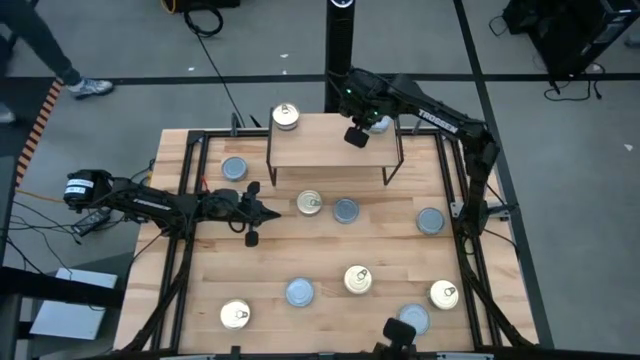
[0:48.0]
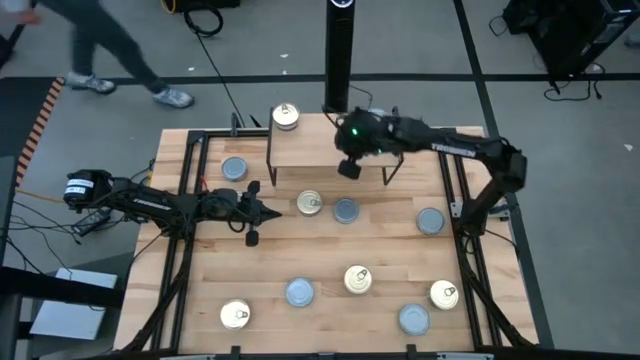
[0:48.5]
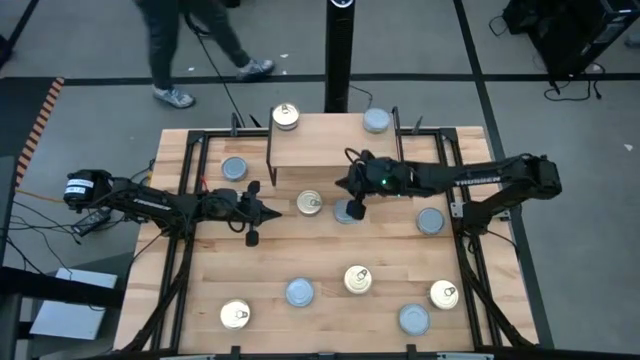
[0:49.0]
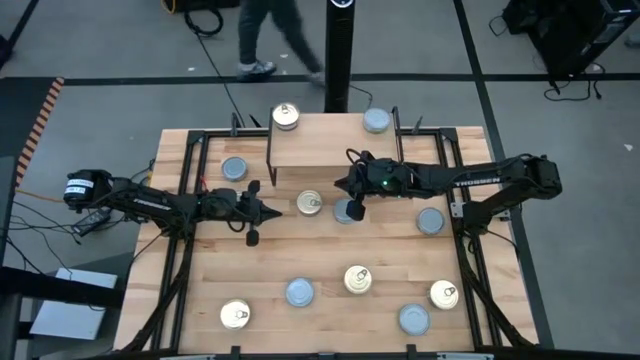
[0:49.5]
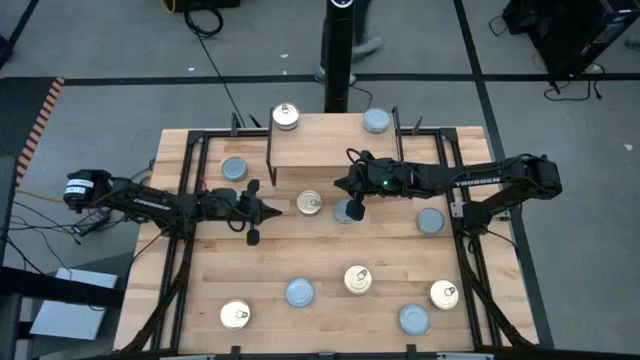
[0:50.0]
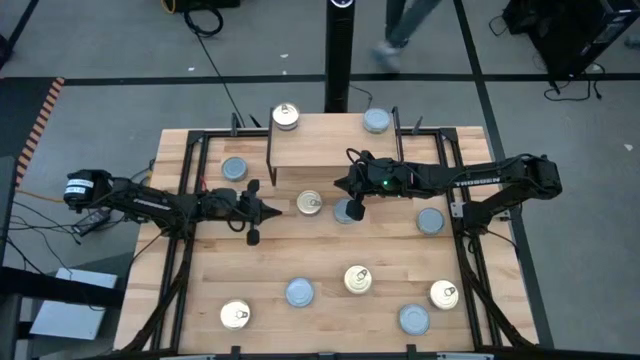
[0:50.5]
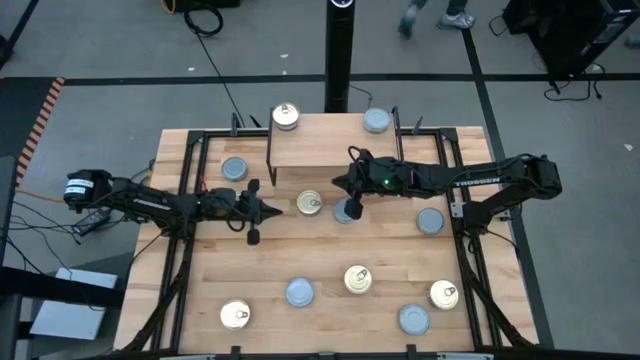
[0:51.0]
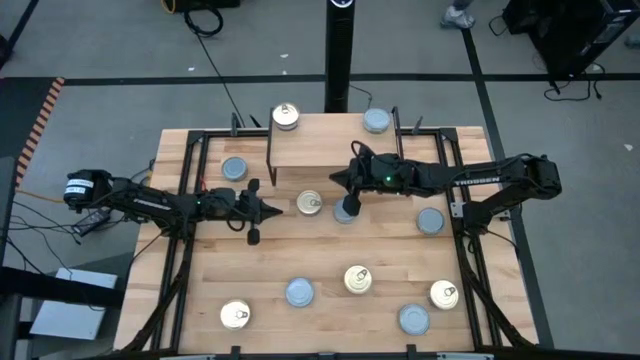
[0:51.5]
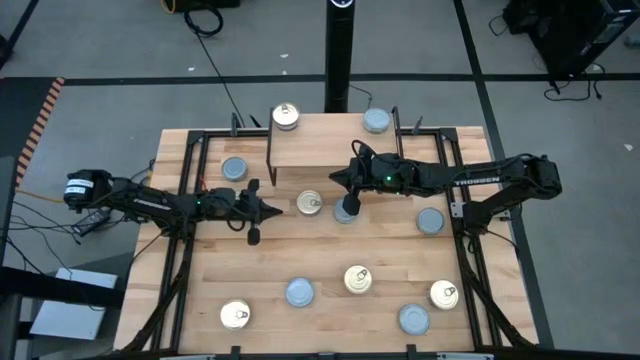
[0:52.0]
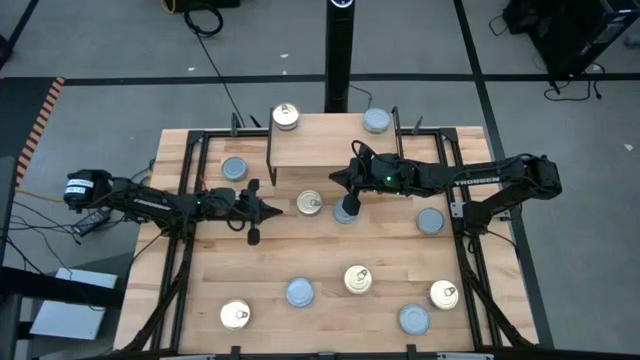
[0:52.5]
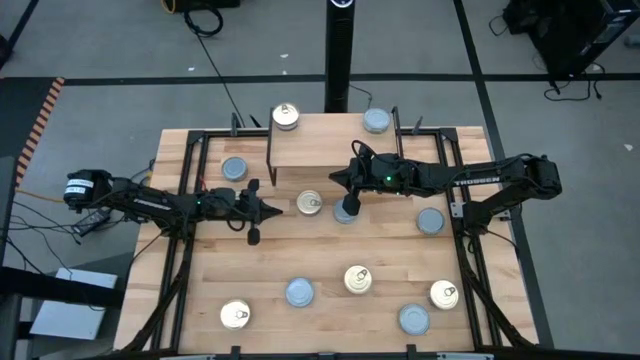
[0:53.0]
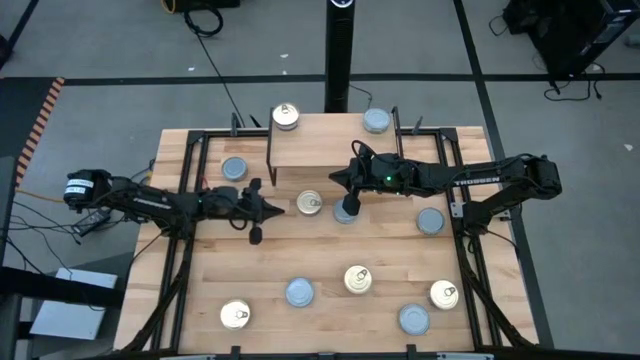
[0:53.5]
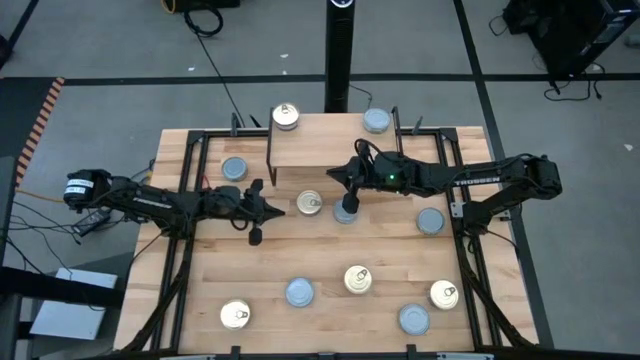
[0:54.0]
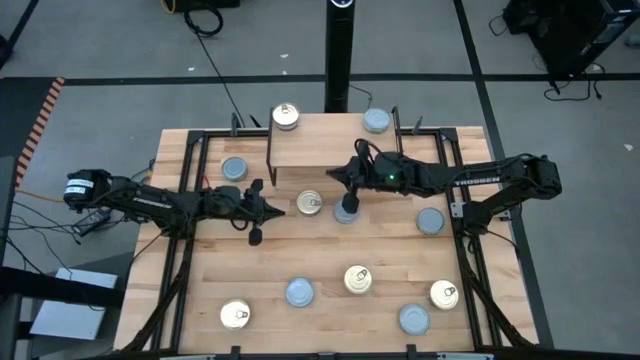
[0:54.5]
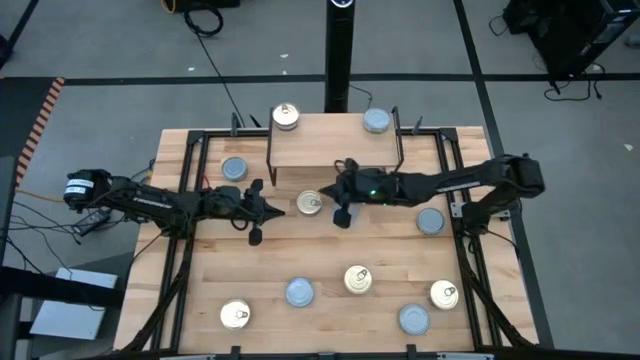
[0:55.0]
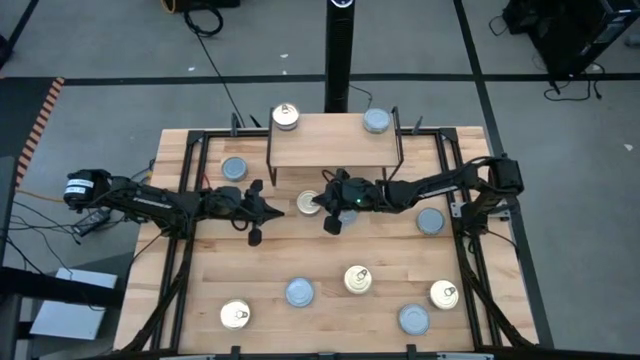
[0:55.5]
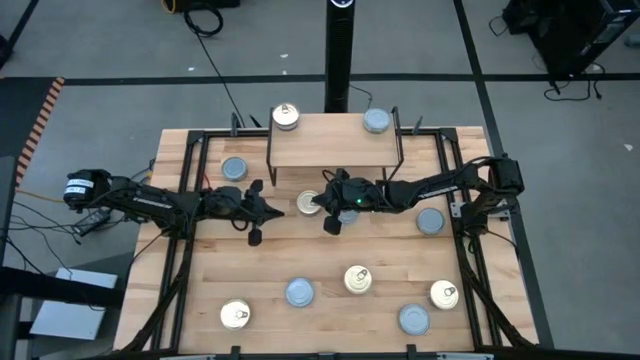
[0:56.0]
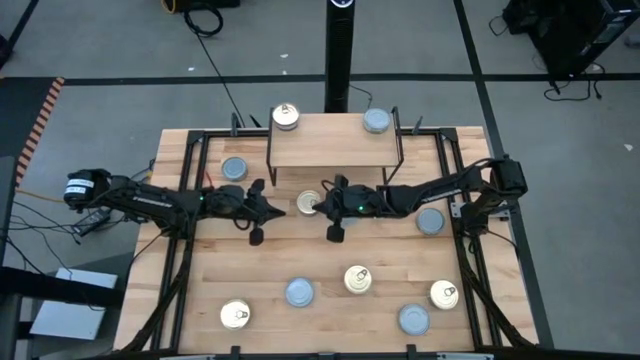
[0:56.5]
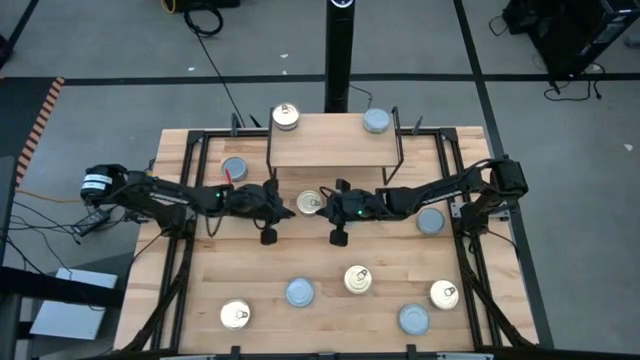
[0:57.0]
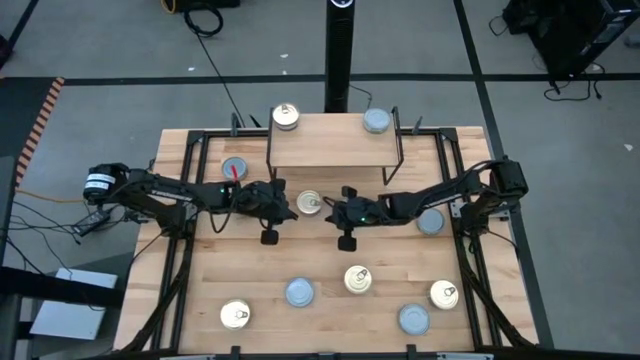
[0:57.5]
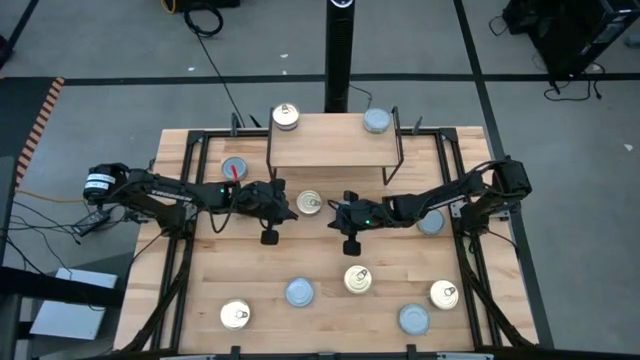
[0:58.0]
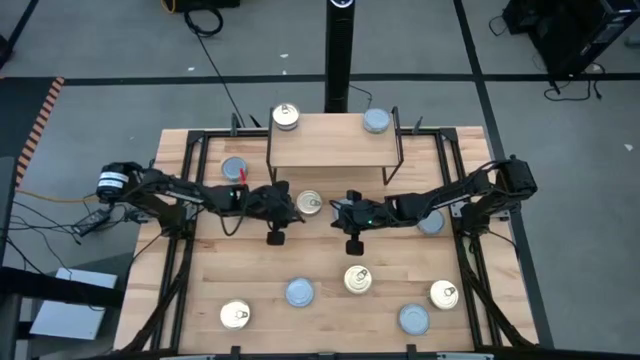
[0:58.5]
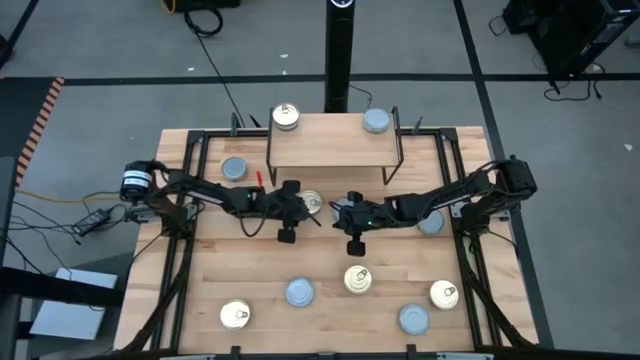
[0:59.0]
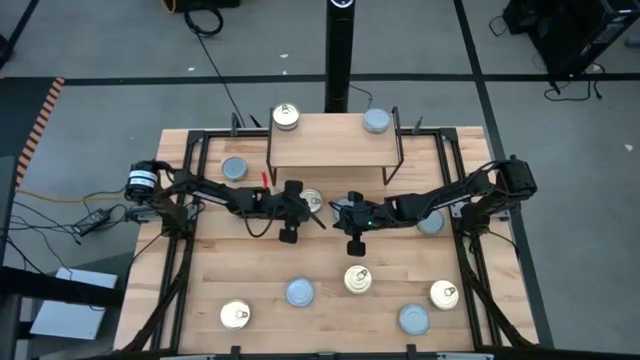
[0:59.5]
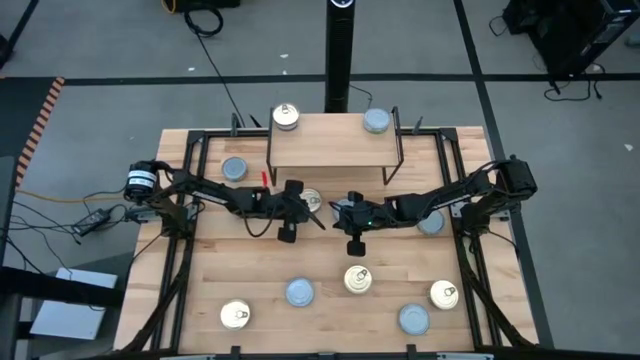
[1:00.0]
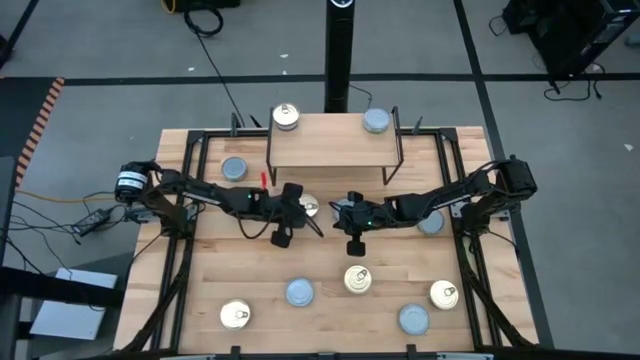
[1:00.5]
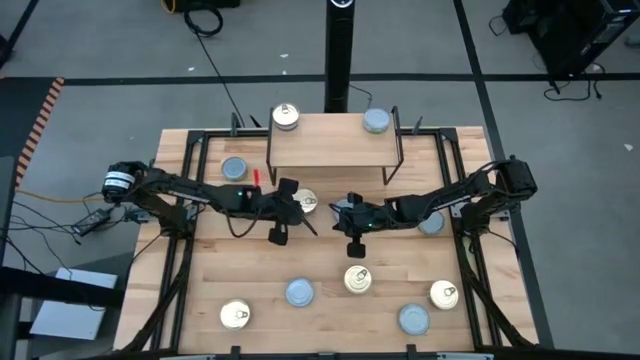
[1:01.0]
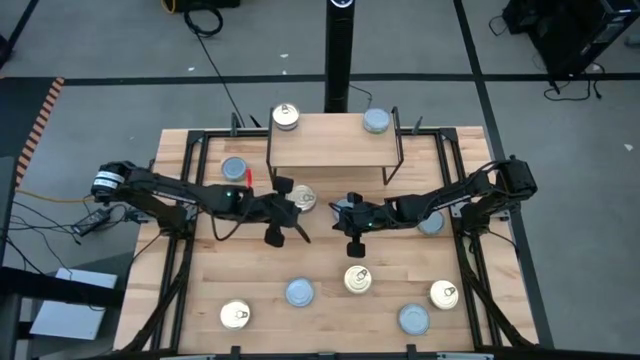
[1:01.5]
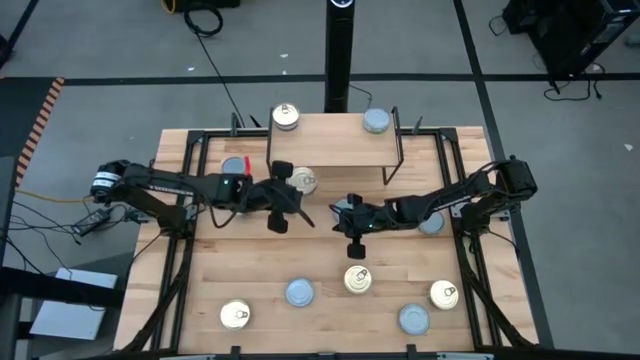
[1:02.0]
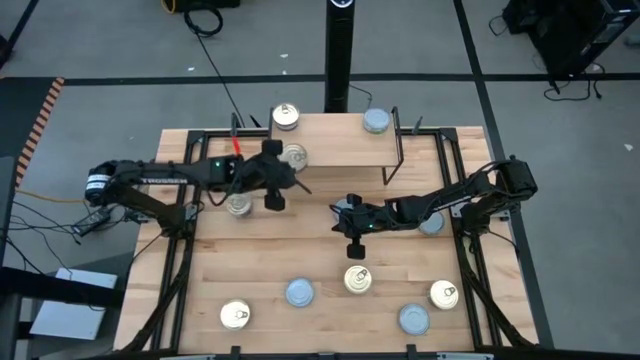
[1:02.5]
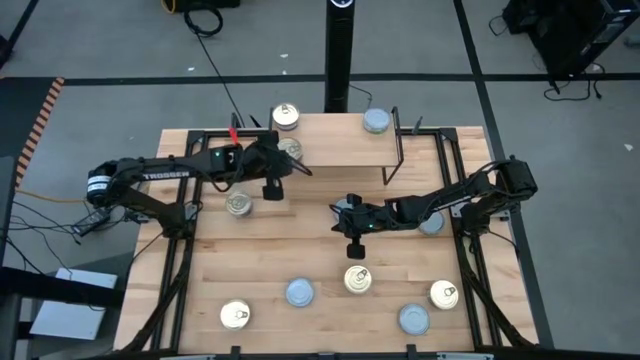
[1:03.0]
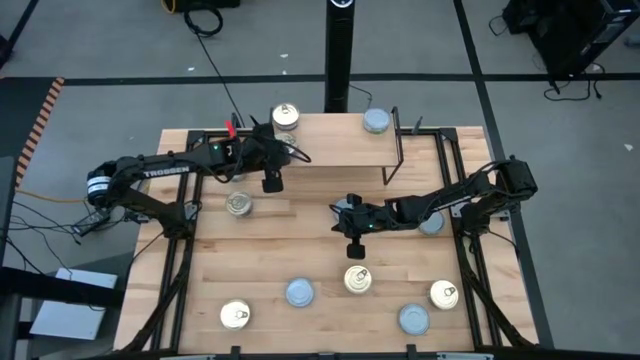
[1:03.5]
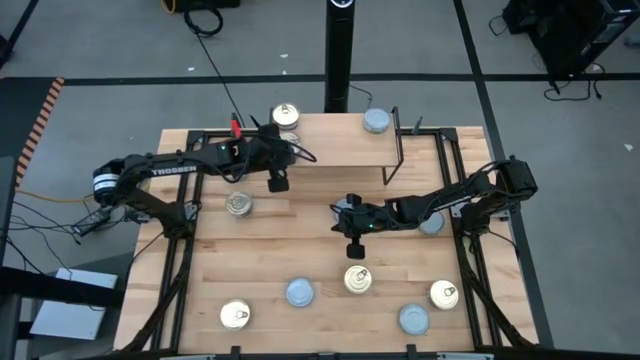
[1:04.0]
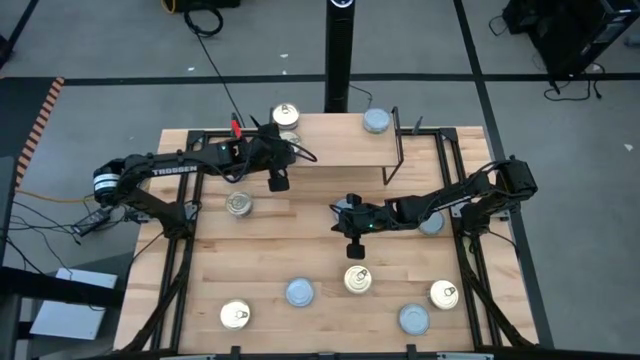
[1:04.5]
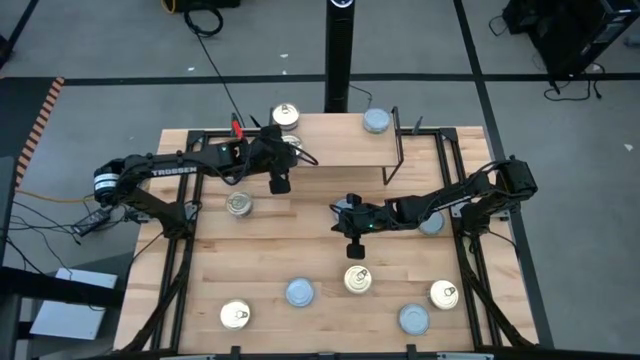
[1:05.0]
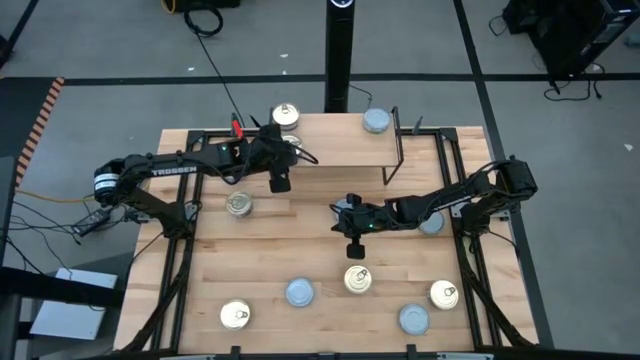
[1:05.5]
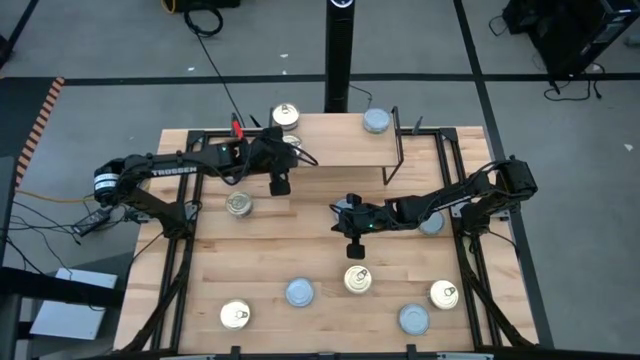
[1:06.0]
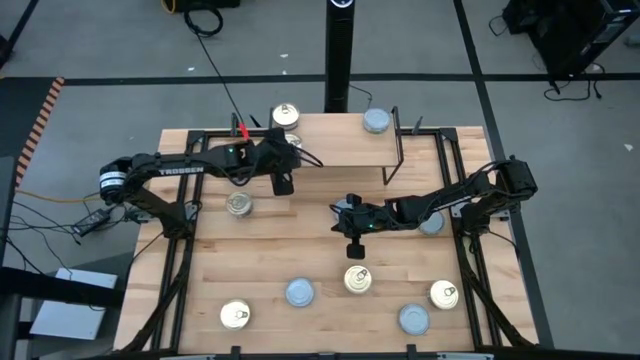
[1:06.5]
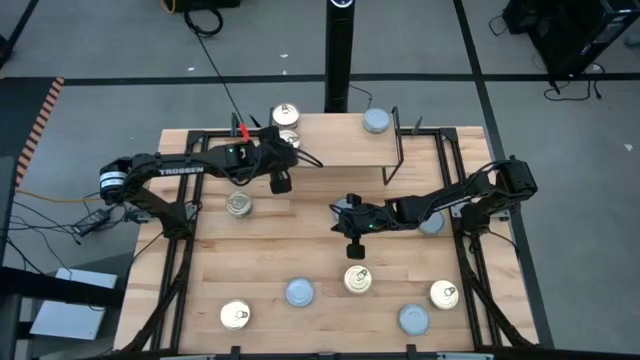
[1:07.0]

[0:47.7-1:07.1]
Task: Stack canned seafood by type on shelf
Put the blue pink tuna can on the shelf

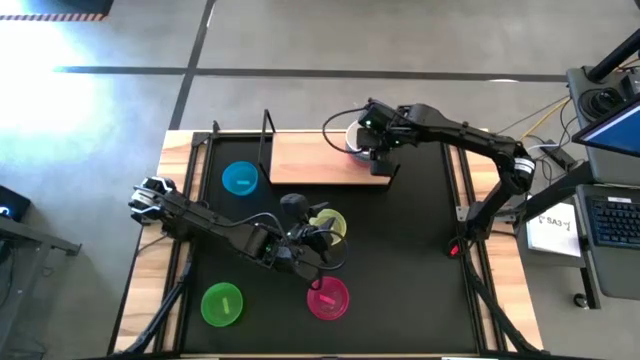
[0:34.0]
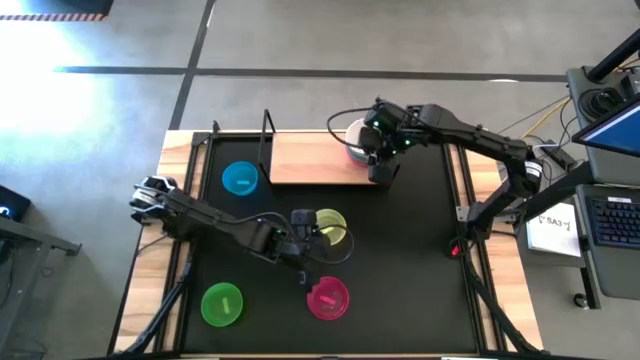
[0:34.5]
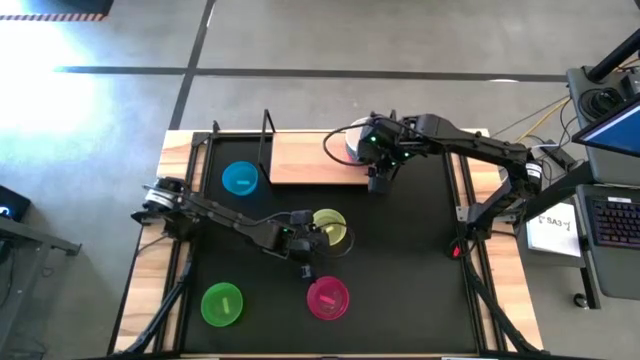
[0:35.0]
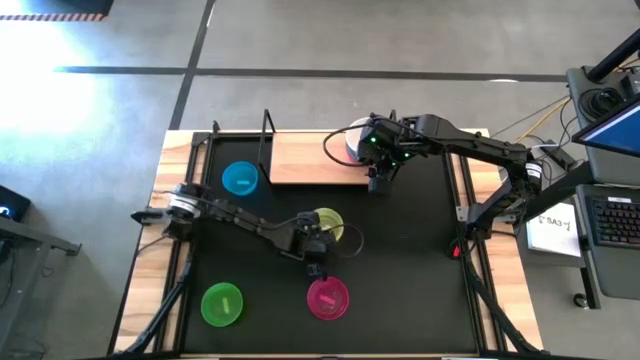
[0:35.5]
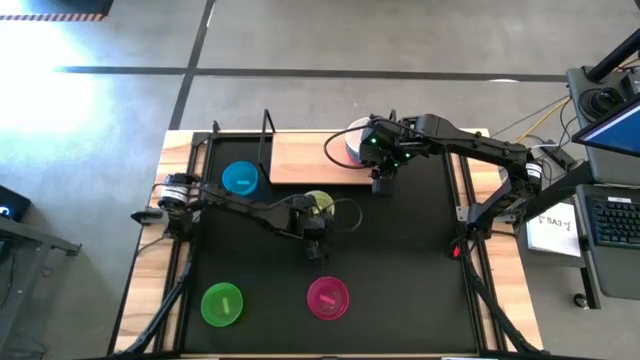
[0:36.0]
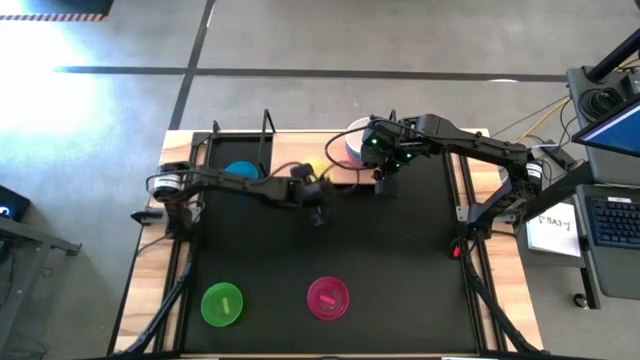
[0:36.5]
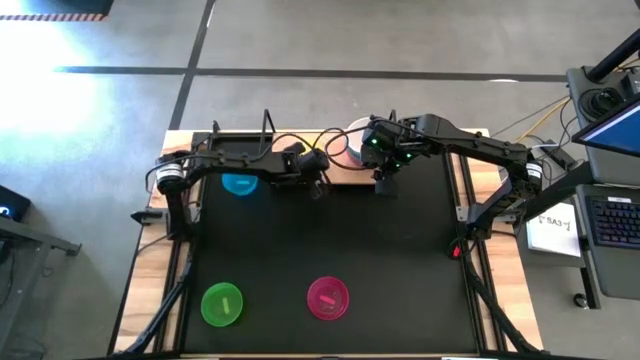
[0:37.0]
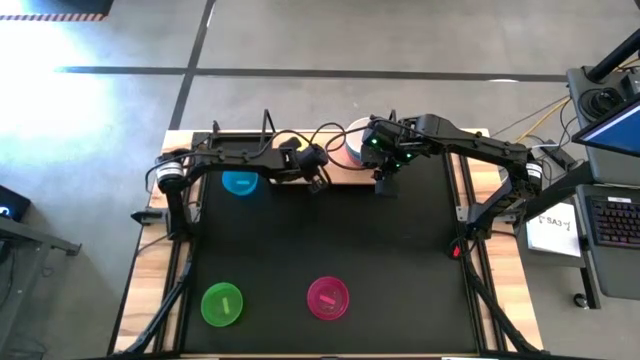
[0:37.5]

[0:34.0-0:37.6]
Task: Place and stack bowls onto a shelf
Put the transparent yellow bowl on the shelf
